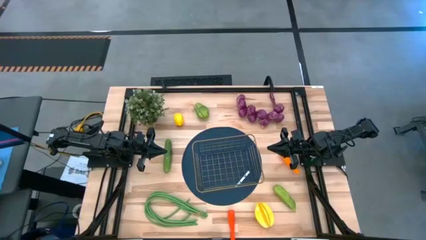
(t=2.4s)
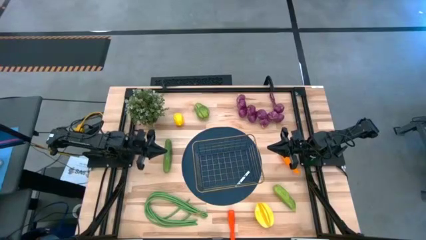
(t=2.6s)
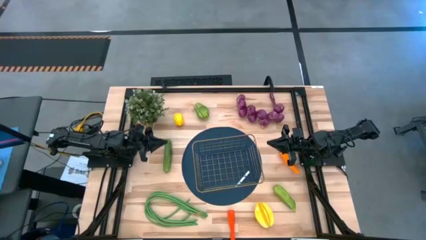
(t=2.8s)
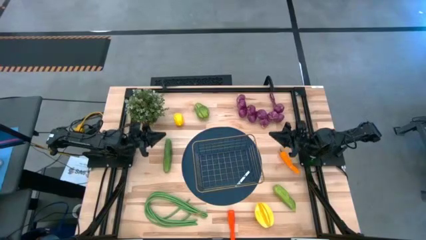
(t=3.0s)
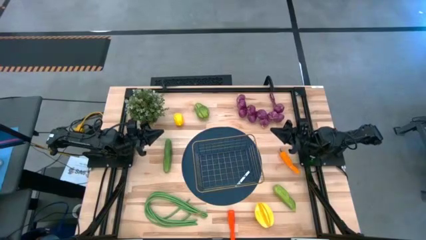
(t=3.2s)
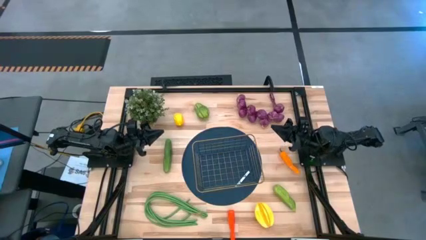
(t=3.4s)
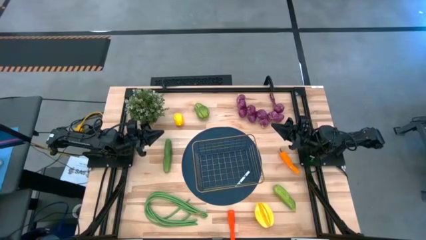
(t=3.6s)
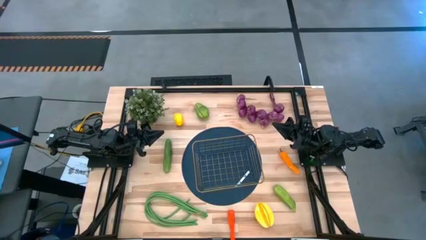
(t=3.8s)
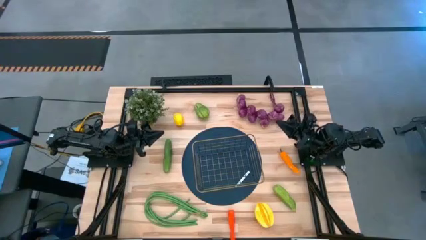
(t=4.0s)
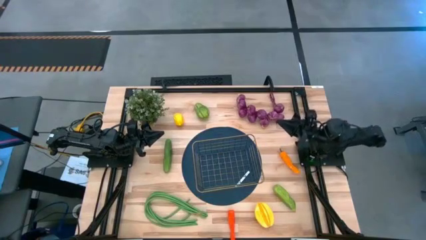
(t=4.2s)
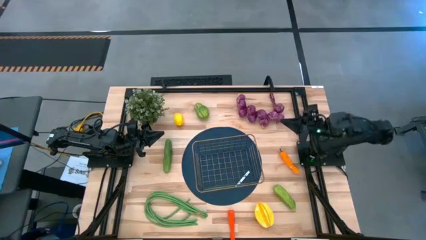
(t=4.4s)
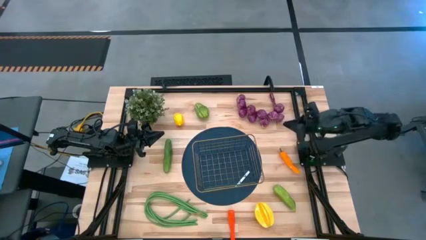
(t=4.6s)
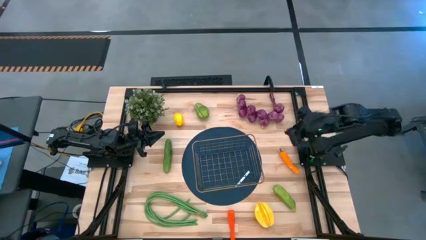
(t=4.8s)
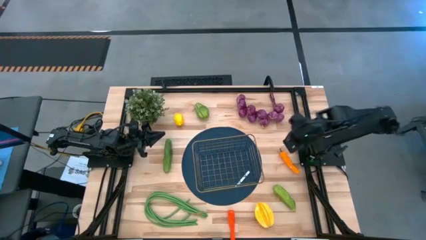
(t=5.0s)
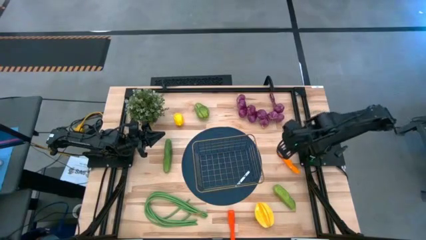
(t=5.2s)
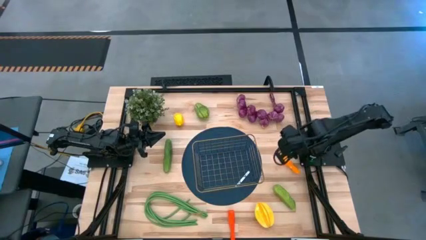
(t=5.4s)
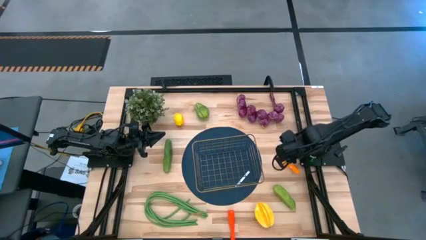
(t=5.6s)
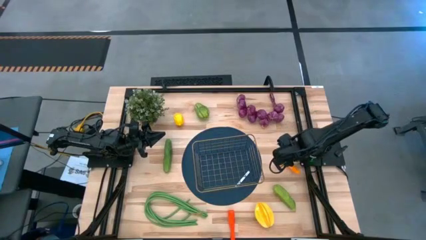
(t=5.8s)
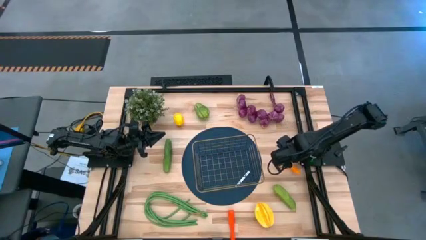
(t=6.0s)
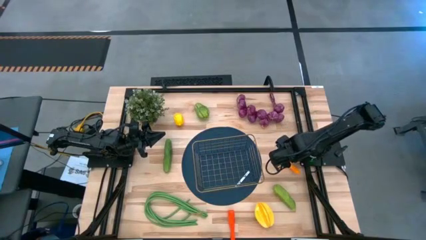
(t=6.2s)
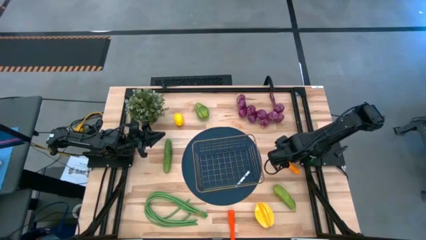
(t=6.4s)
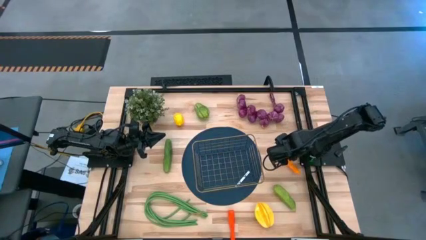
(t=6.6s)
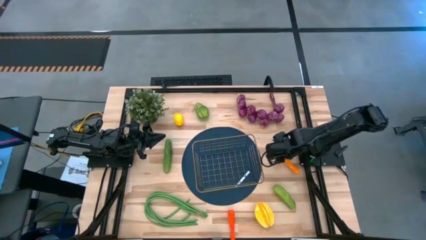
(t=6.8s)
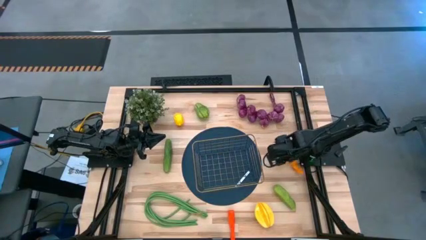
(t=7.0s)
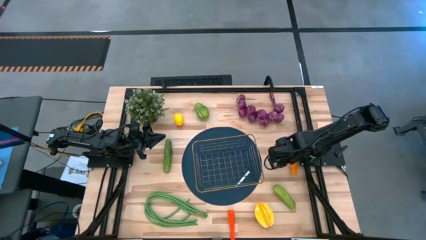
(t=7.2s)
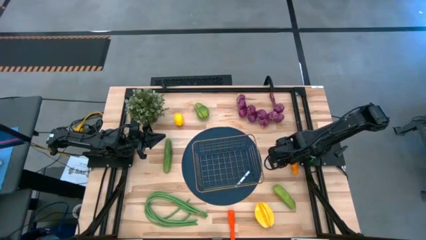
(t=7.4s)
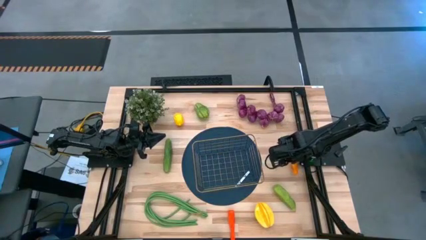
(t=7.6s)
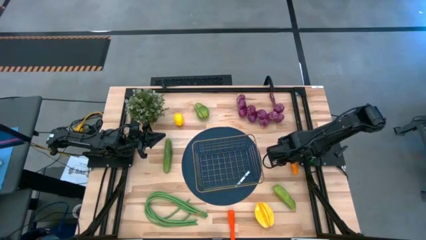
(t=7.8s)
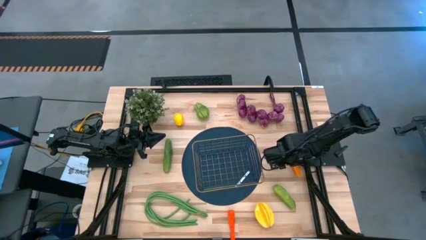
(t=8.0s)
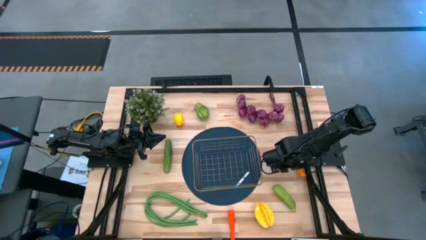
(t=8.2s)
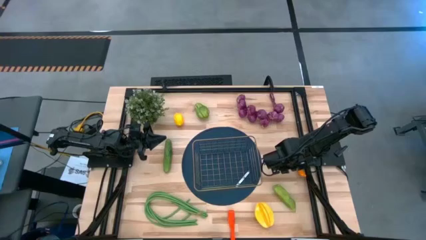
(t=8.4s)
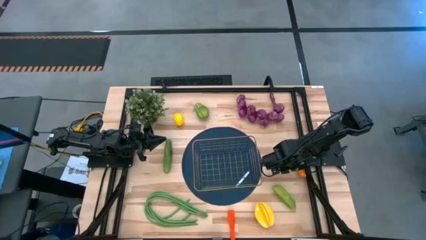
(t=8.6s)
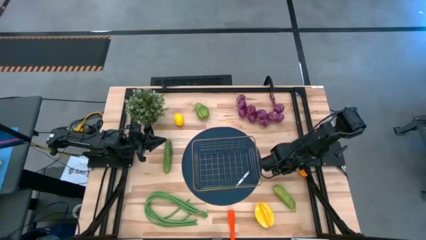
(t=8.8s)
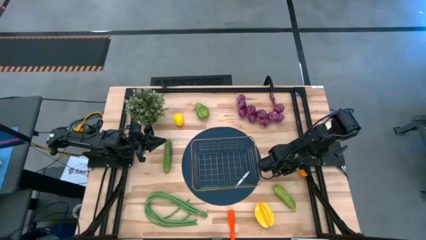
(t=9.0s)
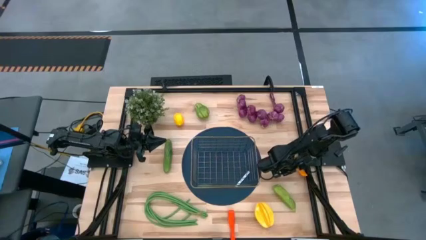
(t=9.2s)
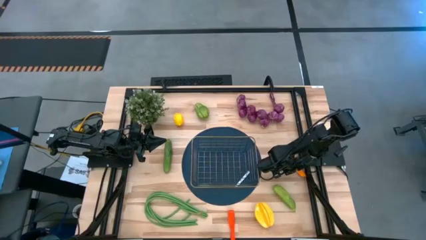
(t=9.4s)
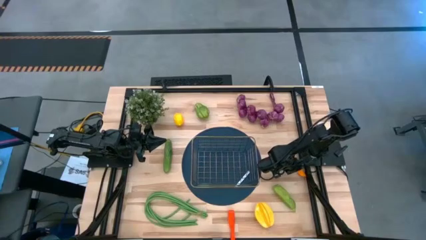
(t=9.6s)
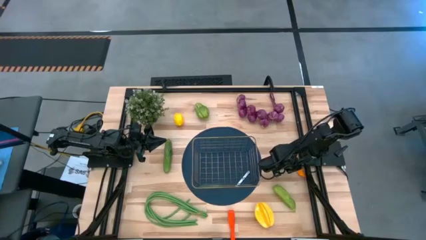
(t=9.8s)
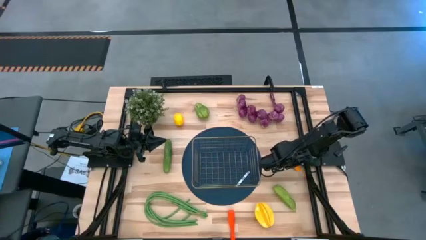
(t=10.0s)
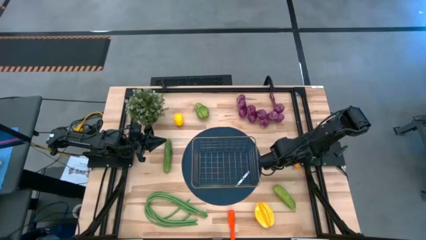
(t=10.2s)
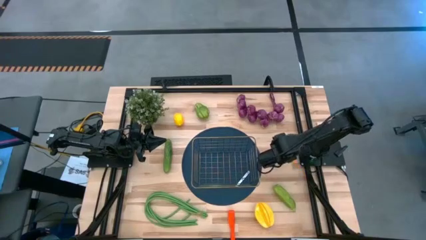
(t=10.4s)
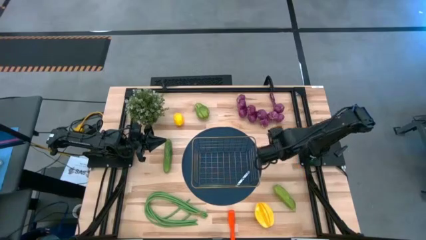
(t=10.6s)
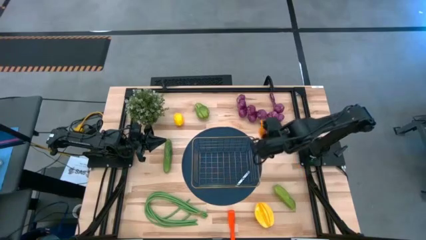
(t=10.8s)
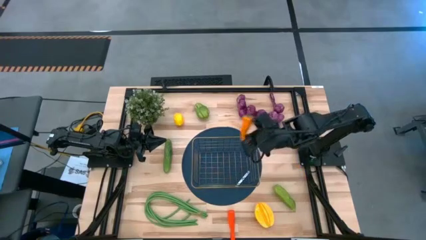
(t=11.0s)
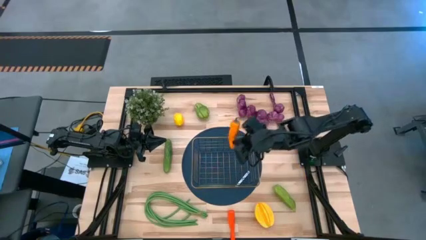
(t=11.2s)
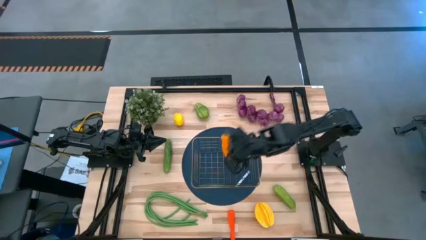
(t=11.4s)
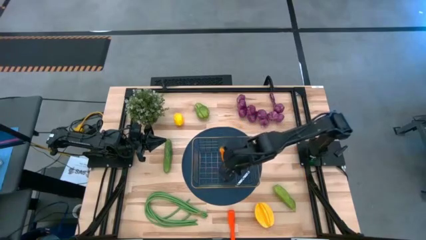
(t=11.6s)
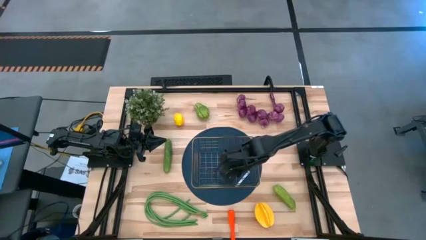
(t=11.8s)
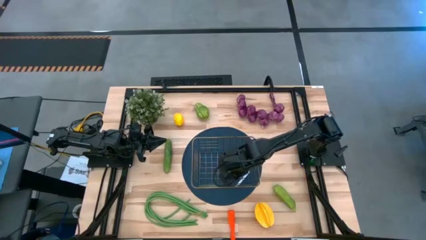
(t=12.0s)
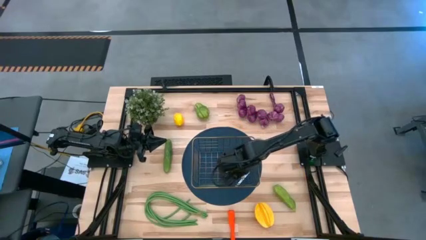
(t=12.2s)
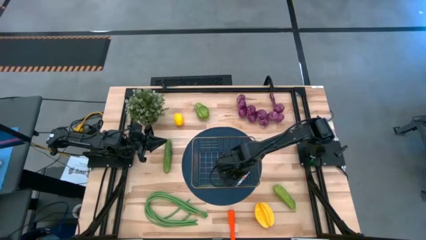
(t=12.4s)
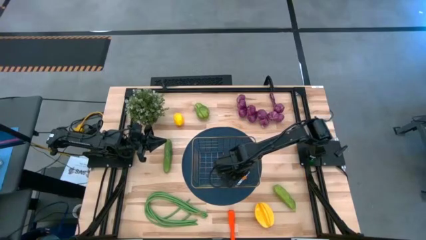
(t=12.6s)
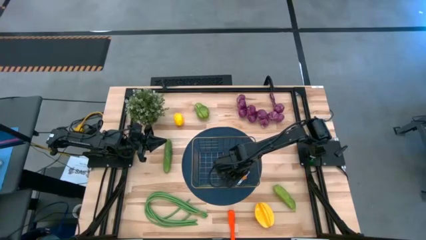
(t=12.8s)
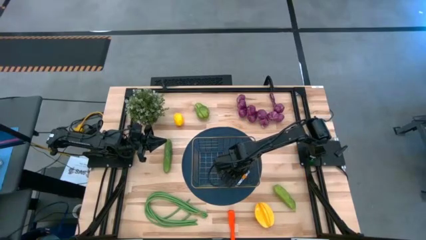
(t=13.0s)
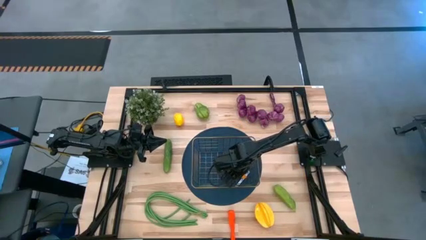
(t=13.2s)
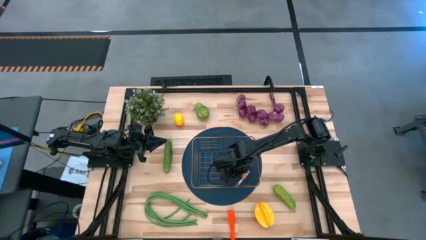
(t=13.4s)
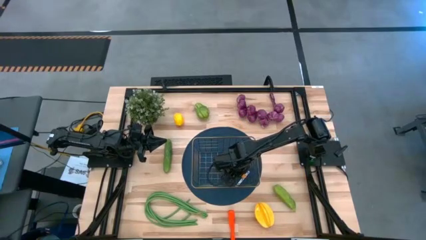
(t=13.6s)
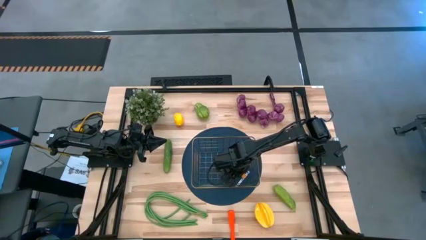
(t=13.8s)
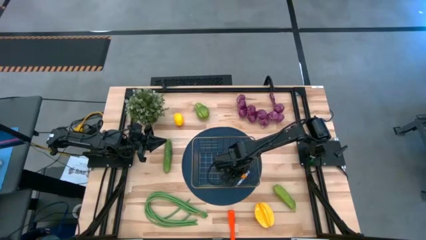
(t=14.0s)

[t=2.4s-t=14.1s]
Task: Build produce basket
Put the orange chili pepper into the gold wire basket
